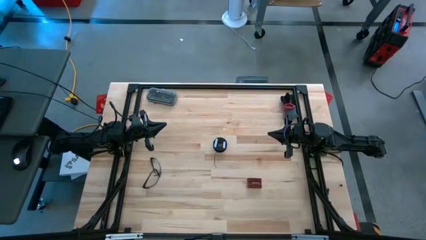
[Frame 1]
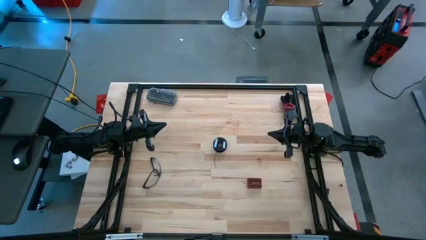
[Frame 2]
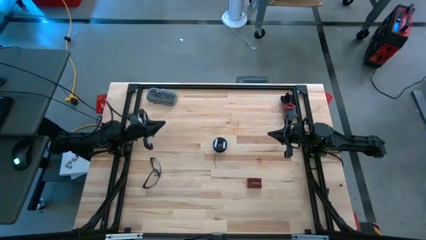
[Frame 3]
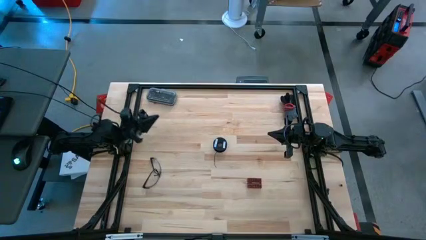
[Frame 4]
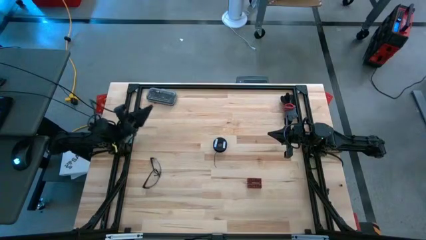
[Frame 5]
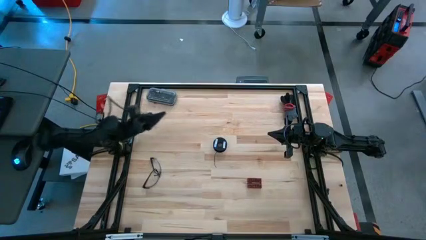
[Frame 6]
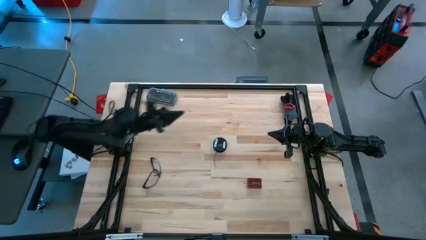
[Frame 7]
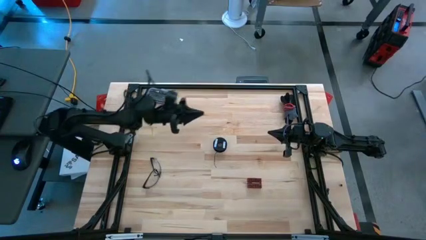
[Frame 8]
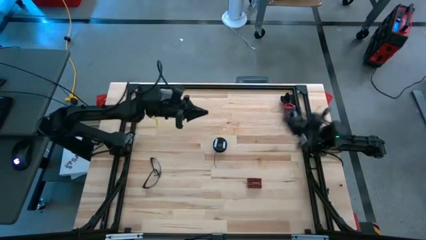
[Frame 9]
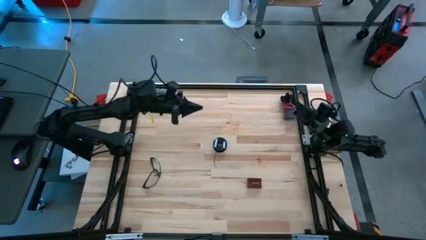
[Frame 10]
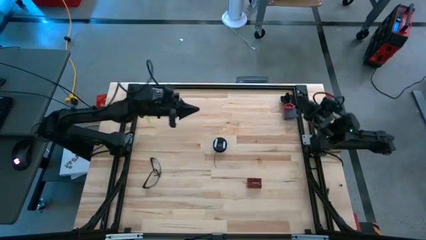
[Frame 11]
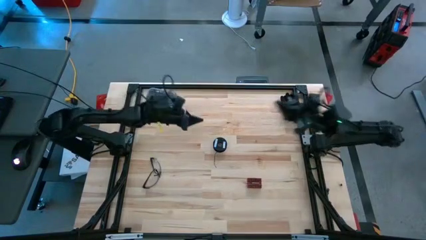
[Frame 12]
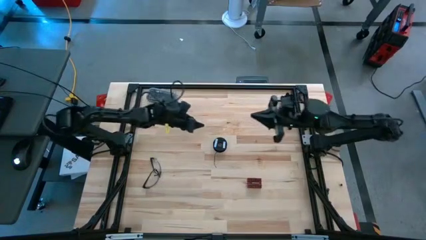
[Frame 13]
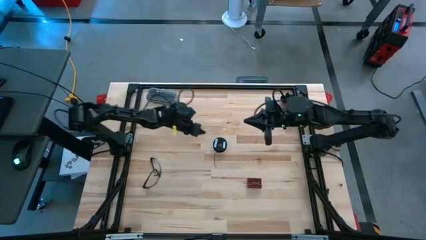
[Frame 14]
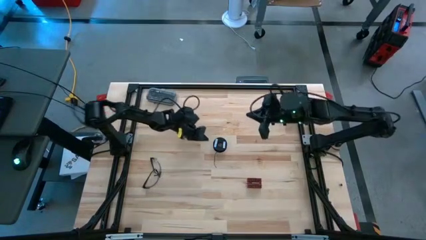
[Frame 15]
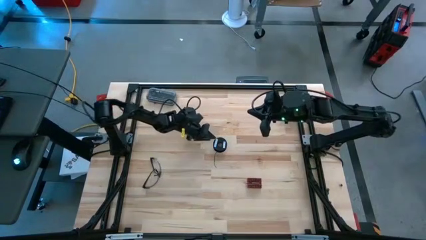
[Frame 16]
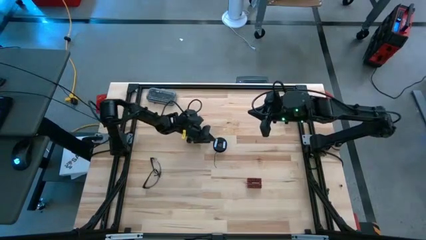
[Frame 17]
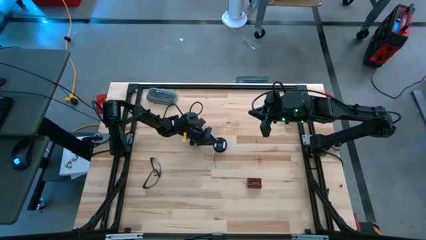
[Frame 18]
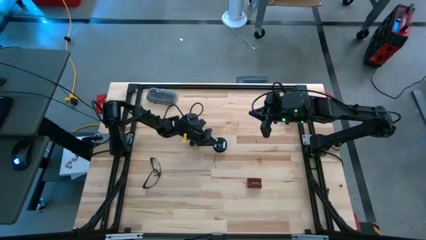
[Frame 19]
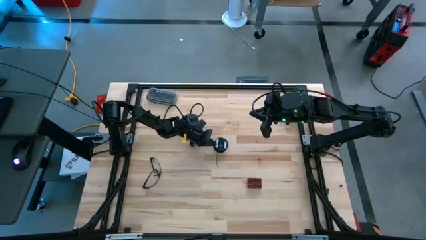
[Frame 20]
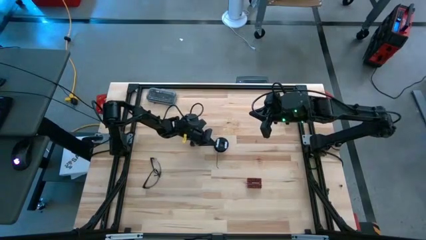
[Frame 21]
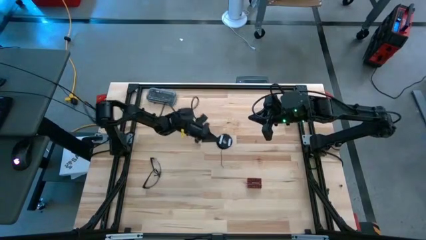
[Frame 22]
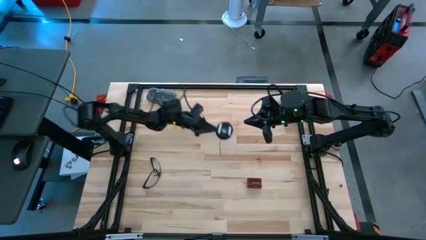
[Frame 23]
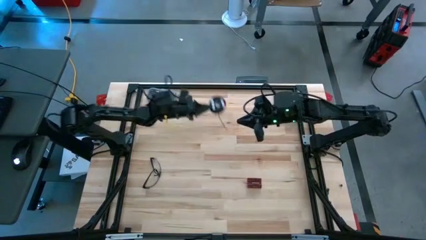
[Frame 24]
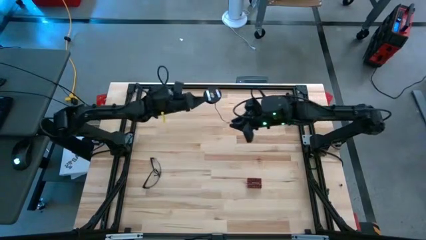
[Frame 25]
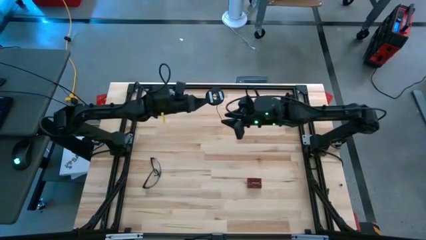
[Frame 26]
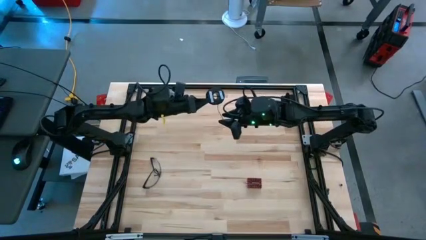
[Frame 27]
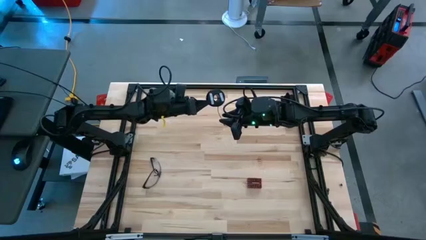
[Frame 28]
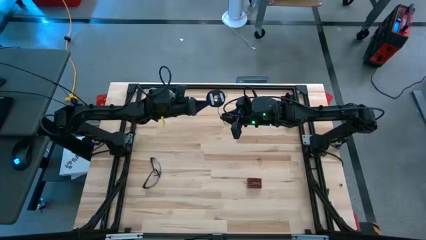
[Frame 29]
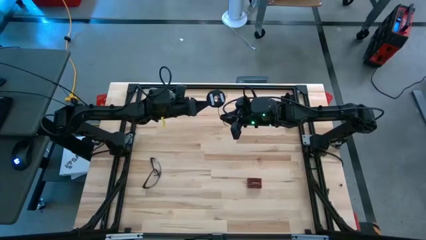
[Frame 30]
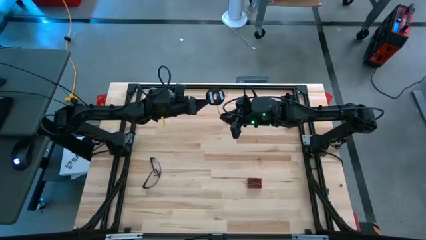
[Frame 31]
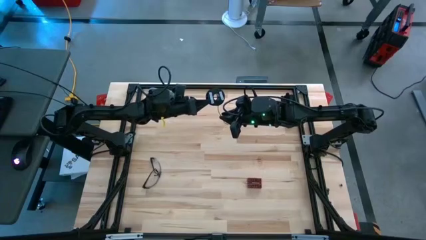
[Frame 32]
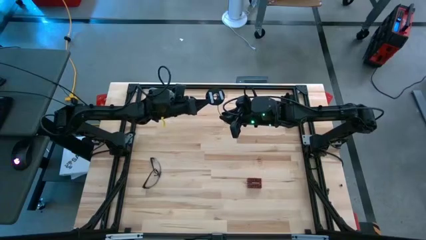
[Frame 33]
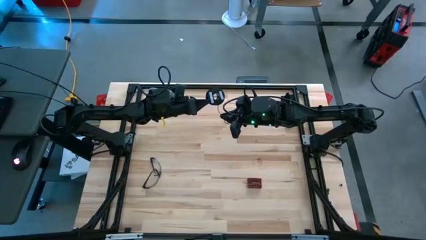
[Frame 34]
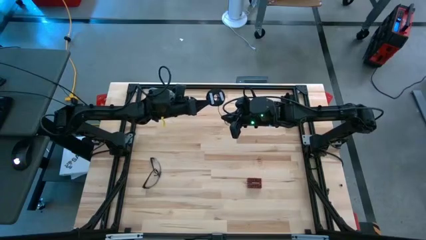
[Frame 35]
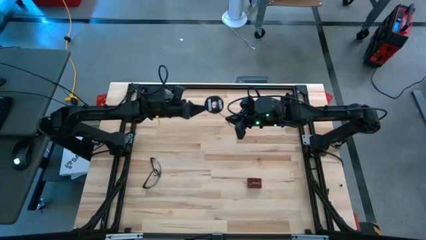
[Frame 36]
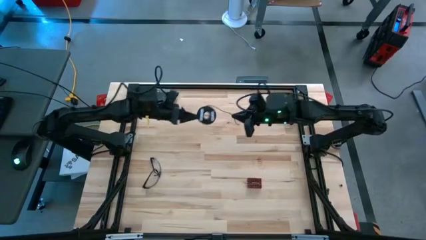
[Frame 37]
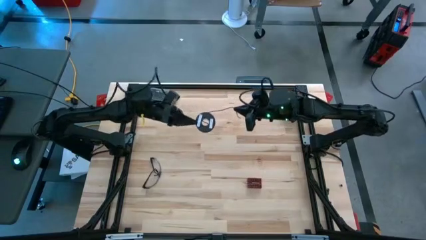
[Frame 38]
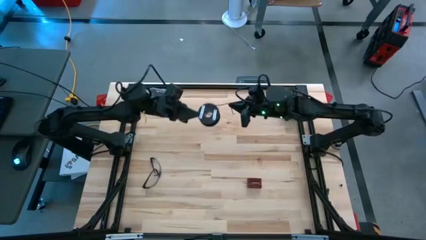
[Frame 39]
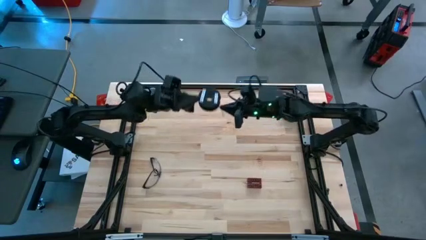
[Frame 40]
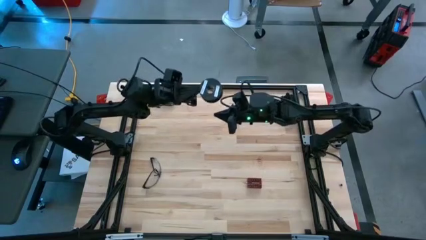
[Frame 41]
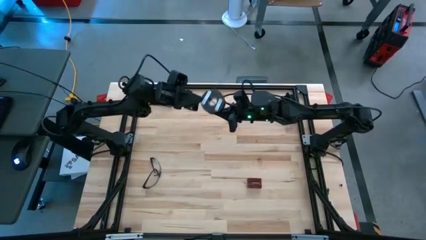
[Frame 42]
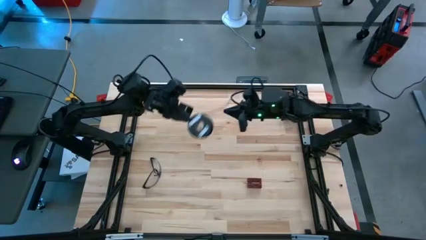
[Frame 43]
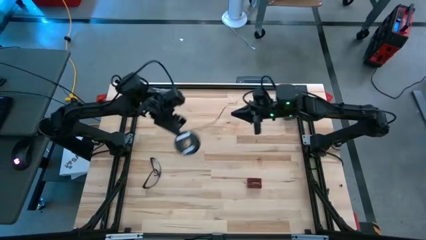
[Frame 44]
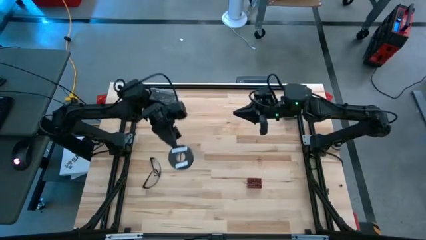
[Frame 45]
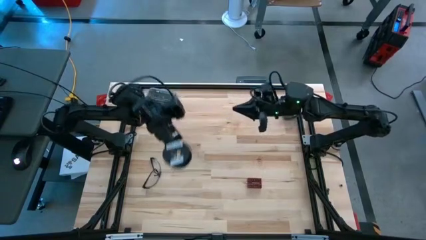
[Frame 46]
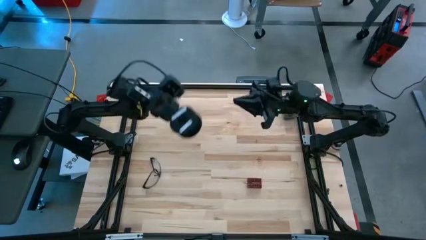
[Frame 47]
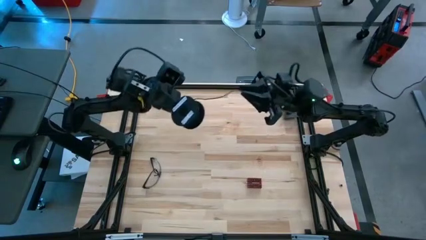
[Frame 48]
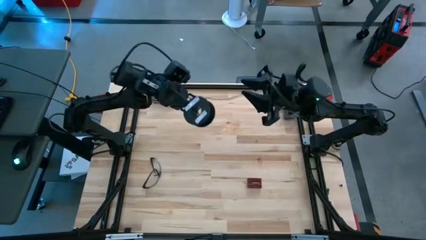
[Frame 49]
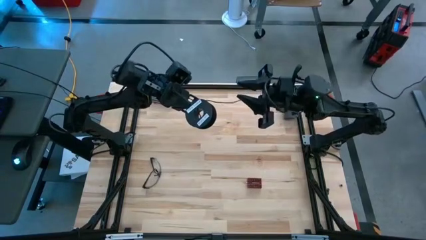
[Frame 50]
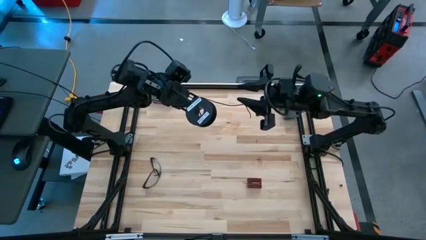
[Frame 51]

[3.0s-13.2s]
Task: Coil cords
Uncoil the black wire from the spool
